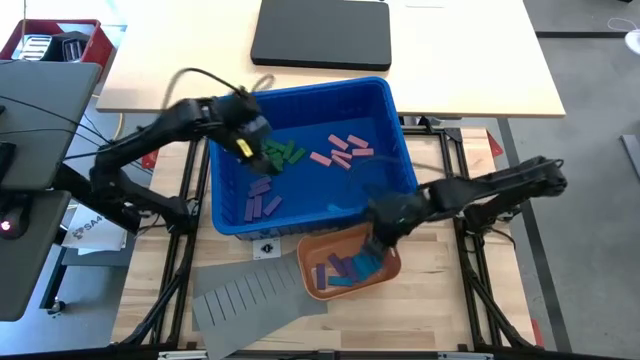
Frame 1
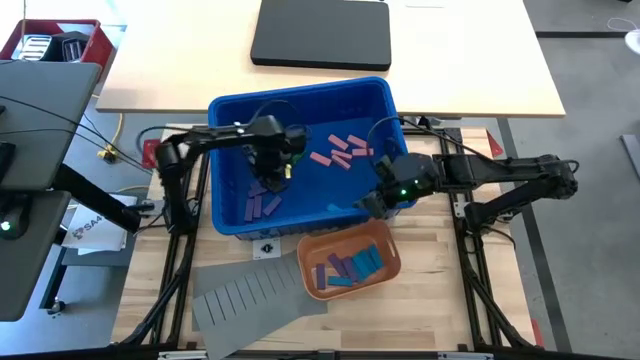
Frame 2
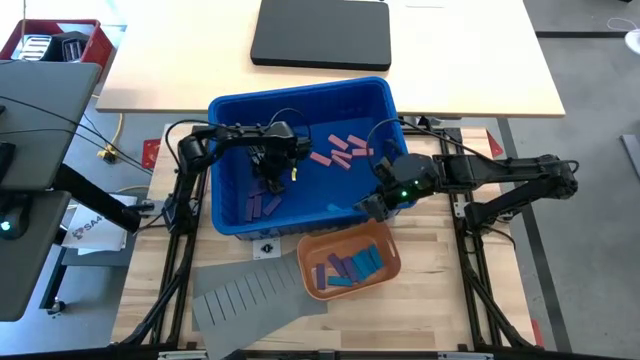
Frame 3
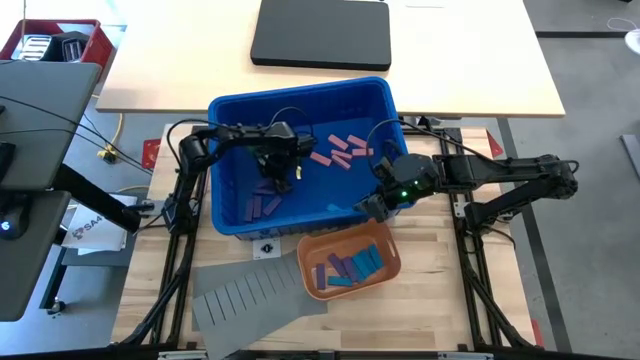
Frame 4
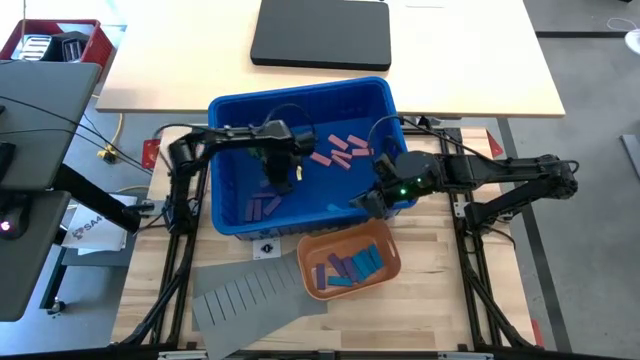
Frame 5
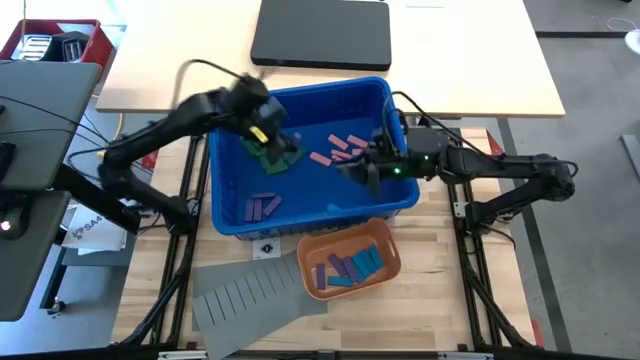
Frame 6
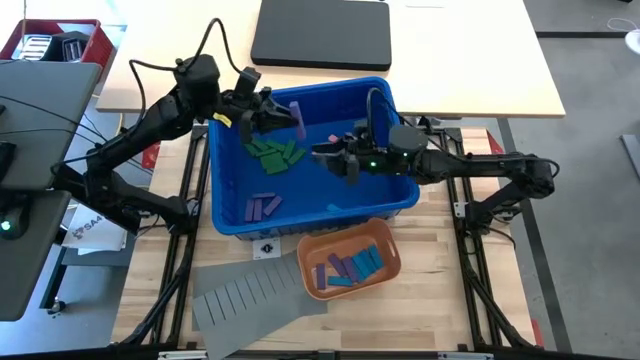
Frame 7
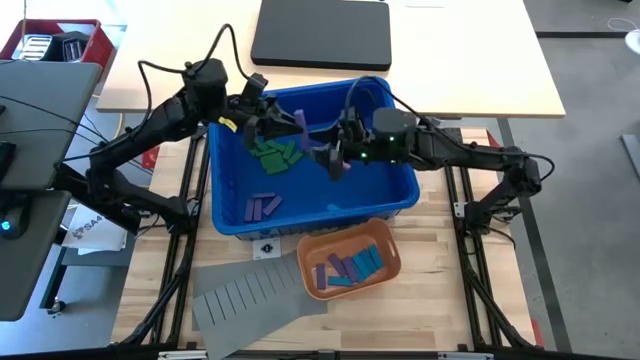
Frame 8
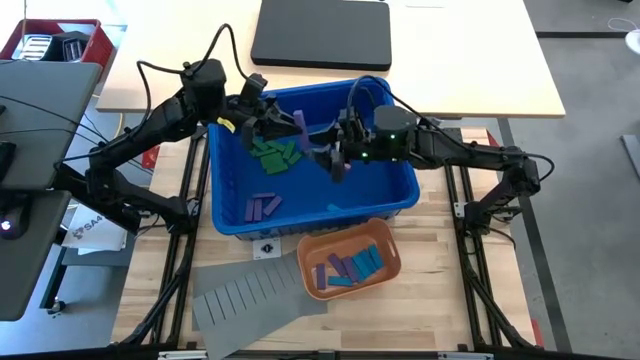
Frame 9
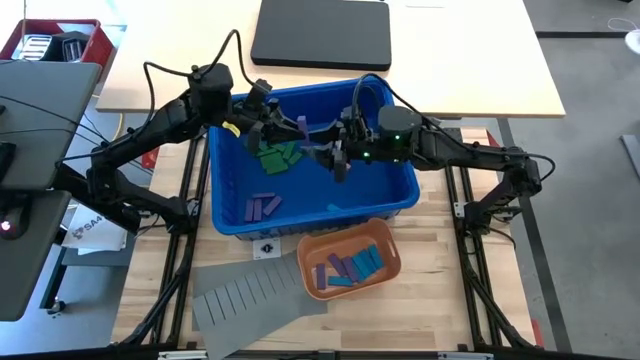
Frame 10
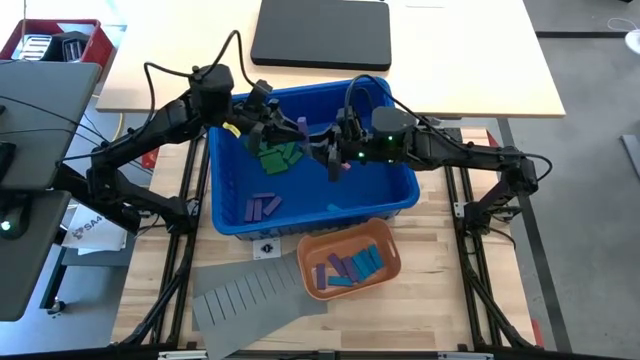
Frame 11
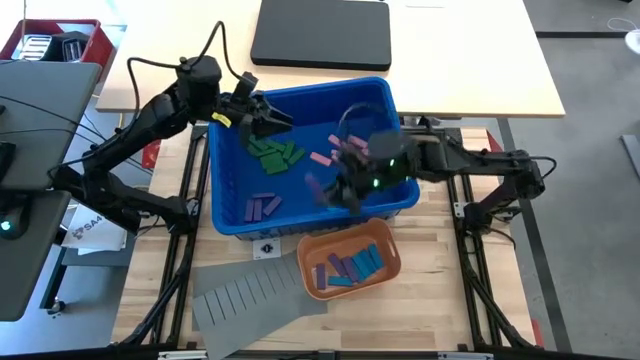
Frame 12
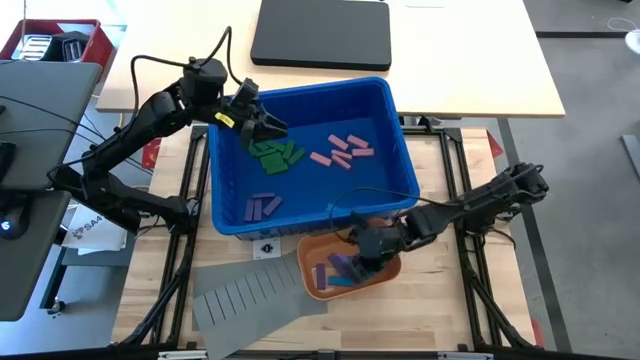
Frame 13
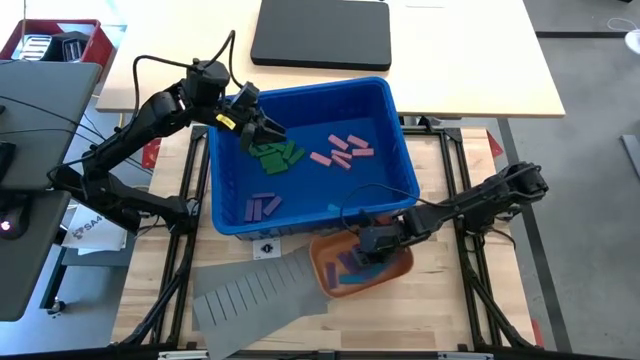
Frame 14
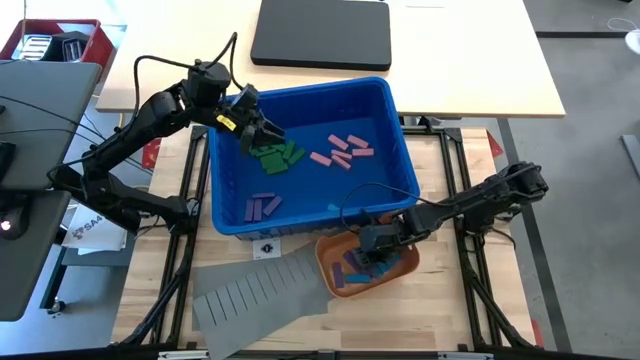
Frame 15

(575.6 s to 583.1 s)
Task: Sort blocks
Put the purple block into the orange bin

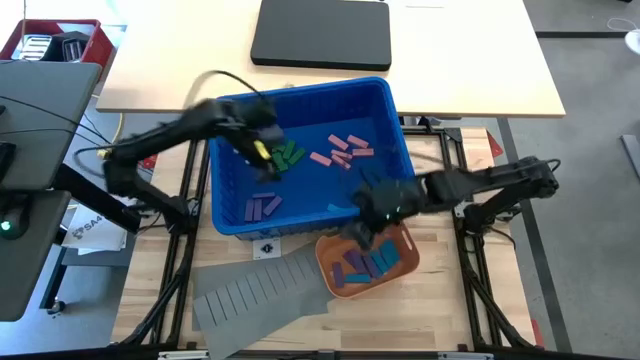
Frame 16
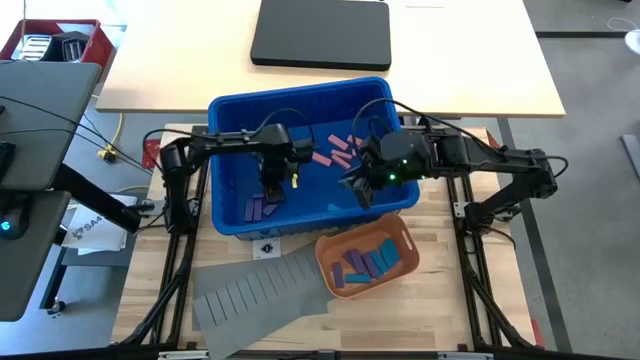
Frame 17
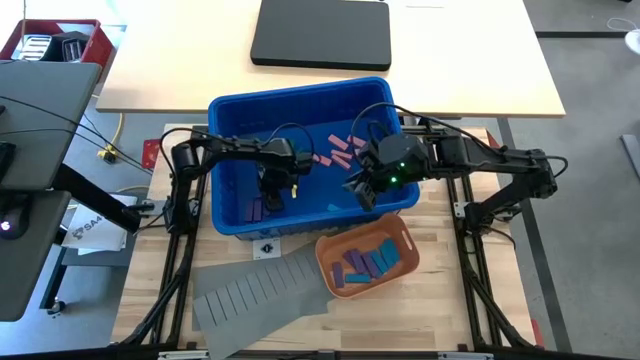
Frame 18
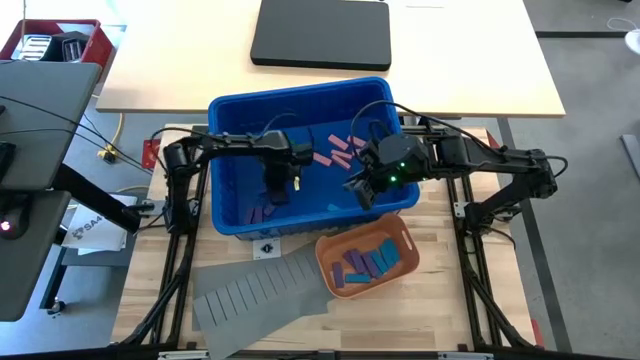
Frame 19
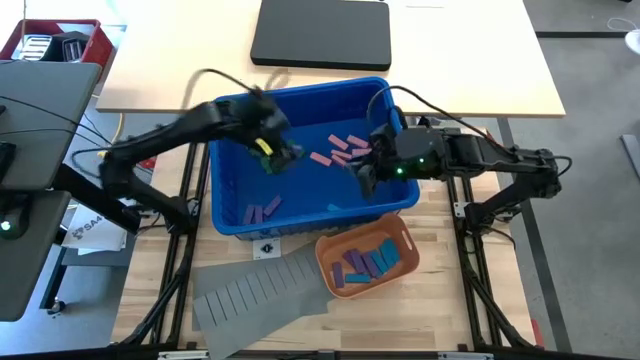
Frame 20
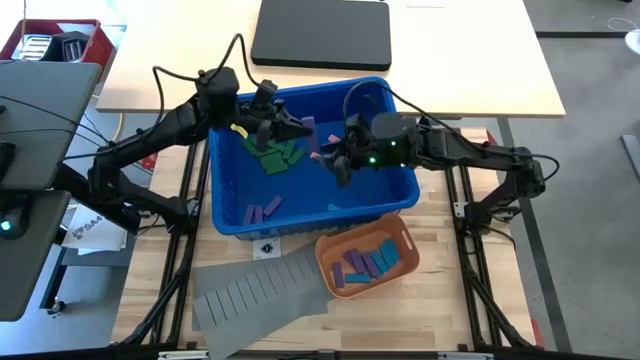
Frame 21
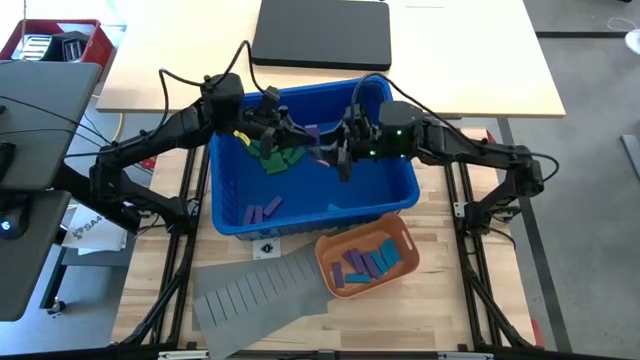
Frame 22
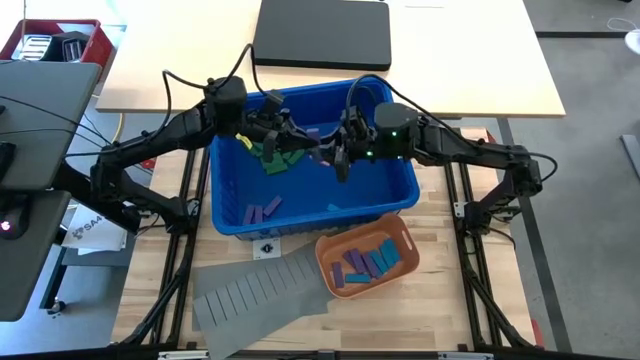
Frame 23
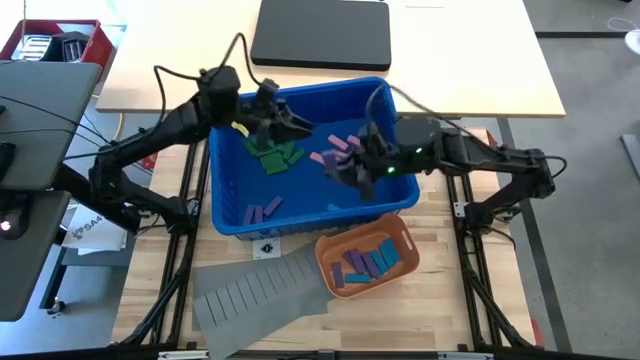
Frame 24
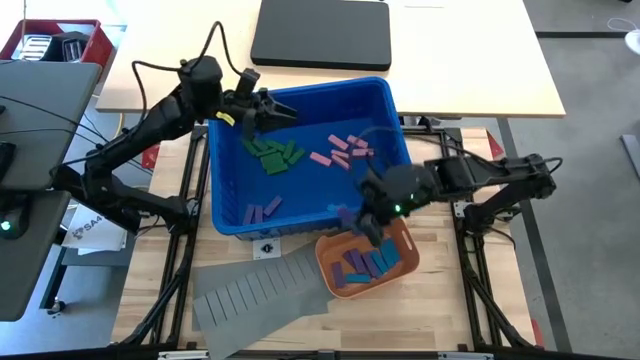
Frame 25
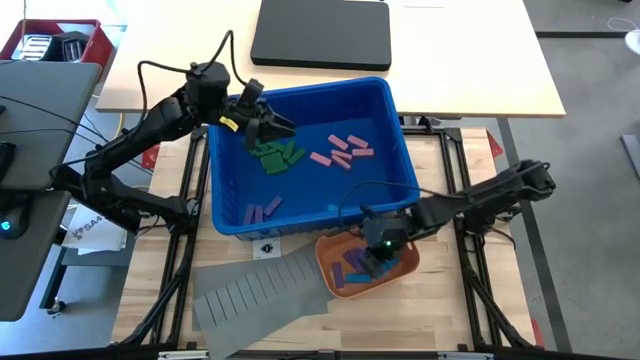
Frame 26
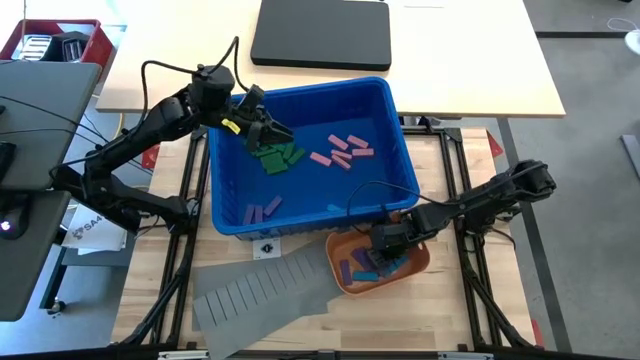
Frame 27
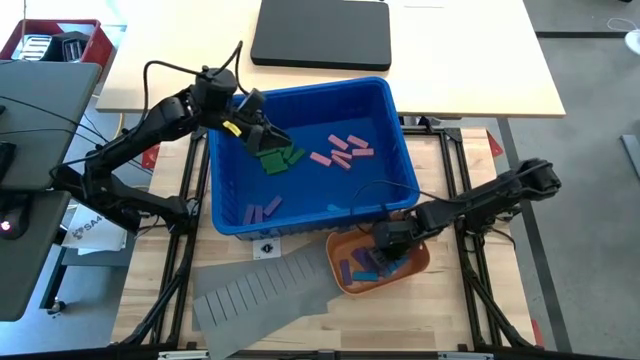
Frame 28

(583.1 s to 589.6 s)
Put the purple block into the orange bin

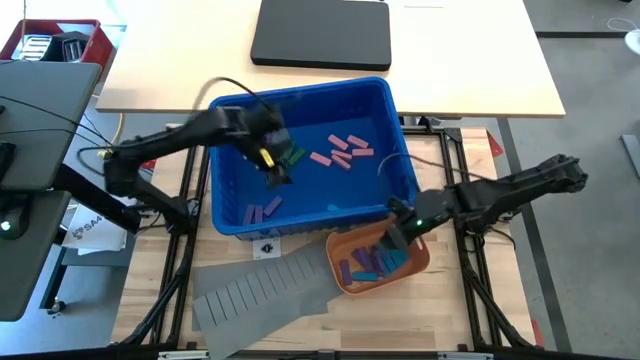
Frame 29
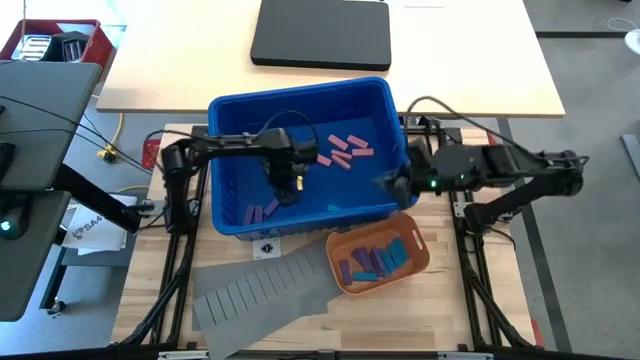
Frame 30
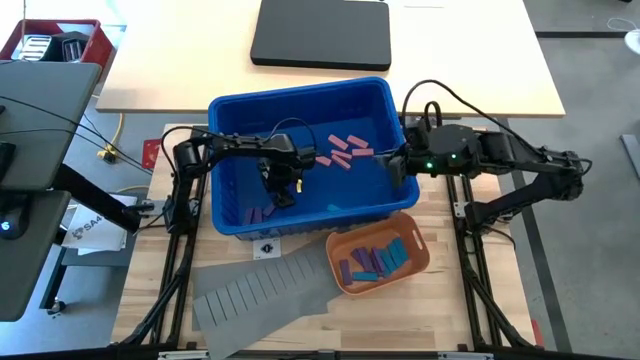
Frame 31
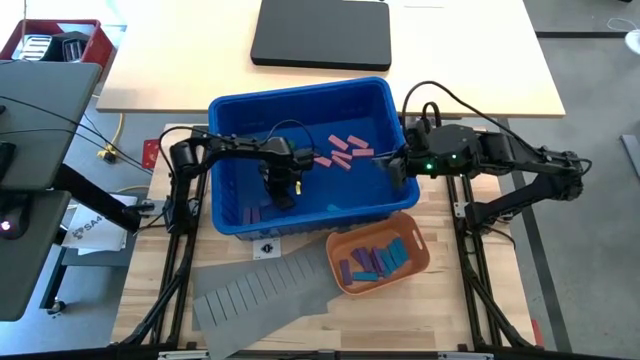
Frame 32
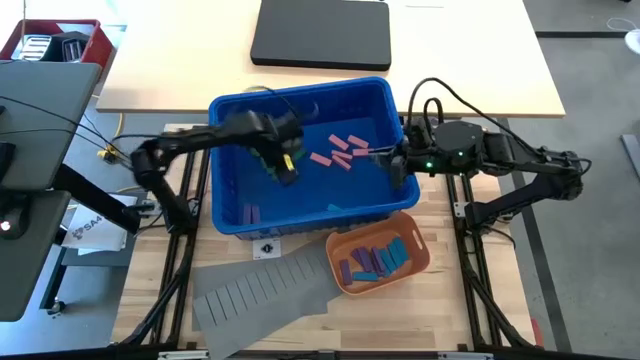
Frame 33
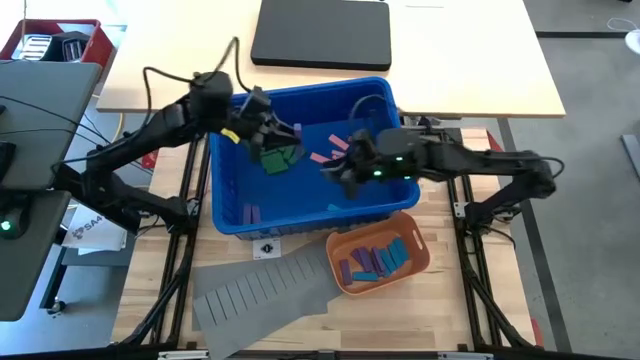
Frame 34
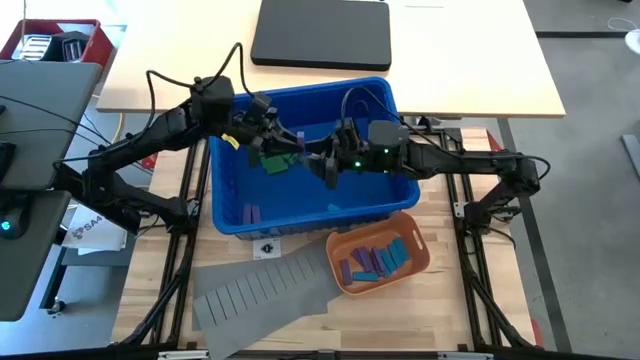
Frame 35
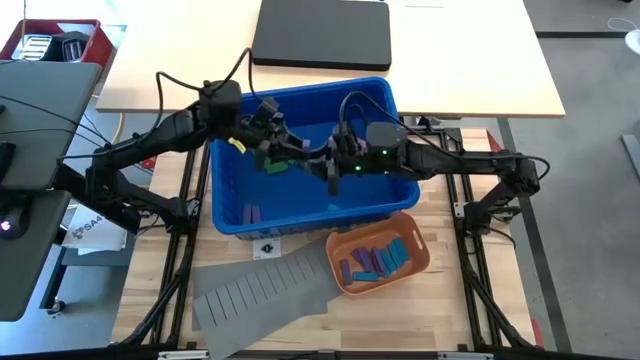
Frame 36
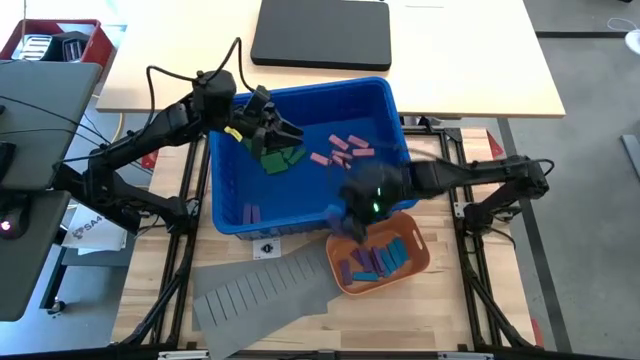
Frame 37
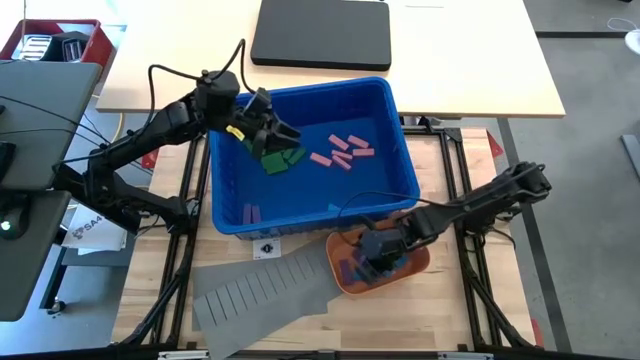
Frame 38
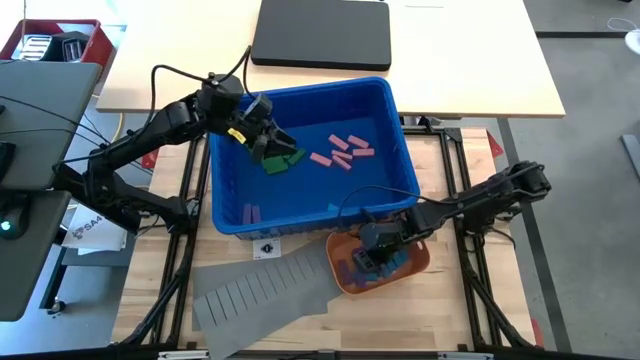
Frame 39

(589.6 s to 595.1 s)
Put the purple block into the orange bin
